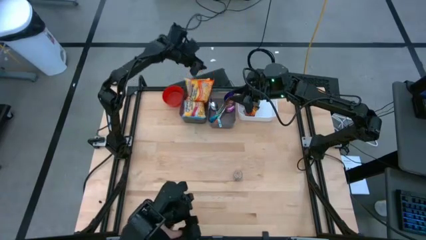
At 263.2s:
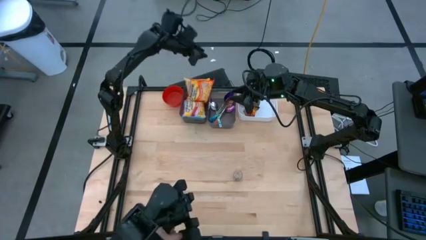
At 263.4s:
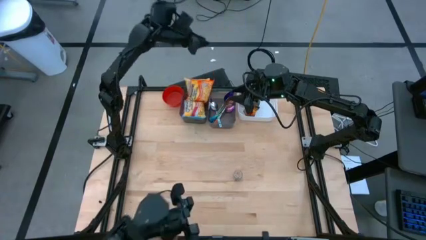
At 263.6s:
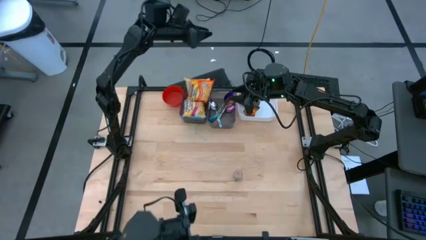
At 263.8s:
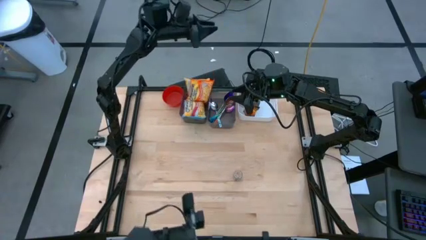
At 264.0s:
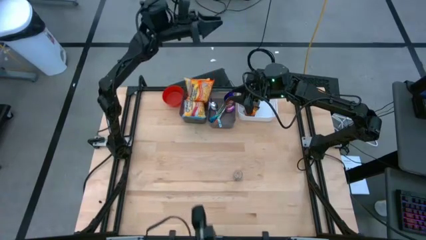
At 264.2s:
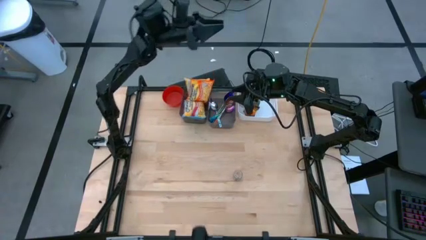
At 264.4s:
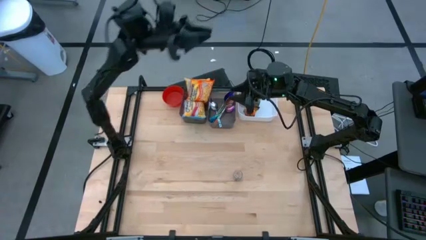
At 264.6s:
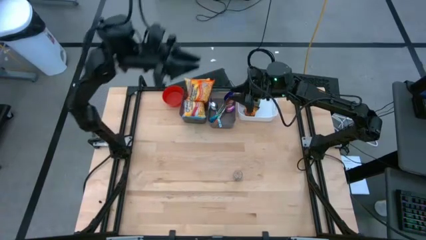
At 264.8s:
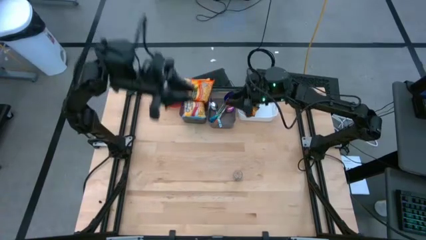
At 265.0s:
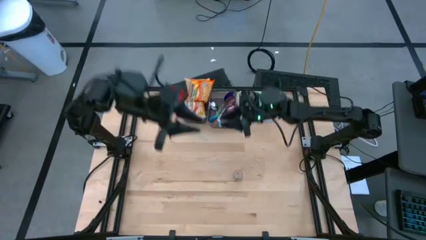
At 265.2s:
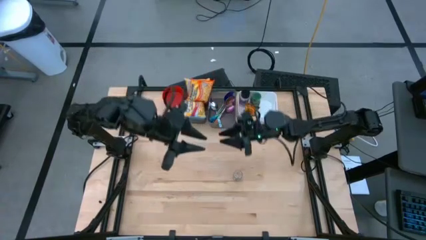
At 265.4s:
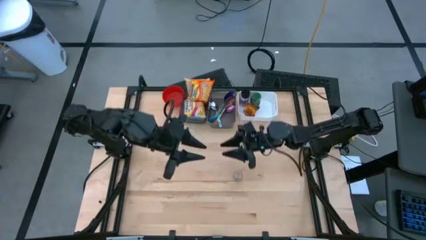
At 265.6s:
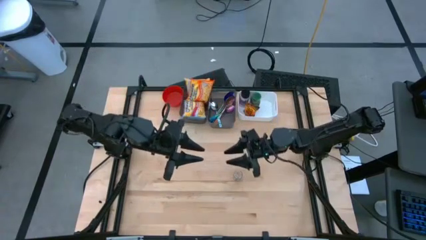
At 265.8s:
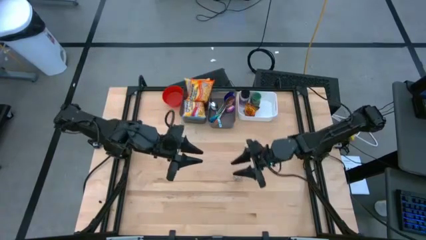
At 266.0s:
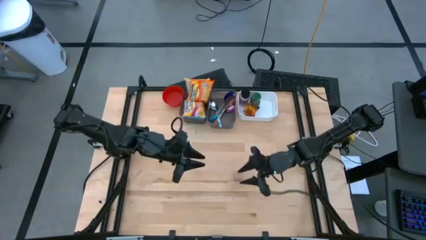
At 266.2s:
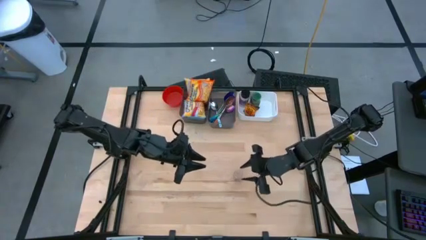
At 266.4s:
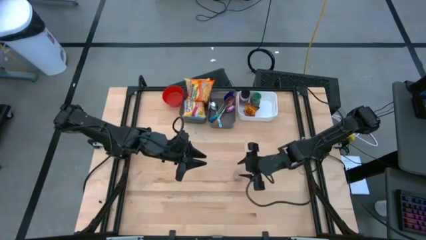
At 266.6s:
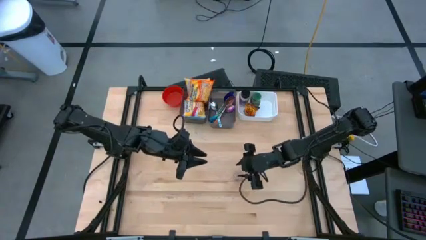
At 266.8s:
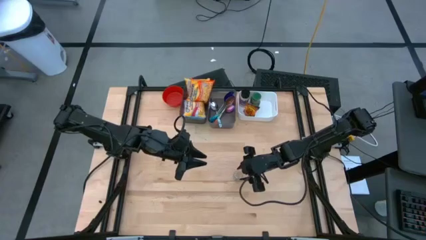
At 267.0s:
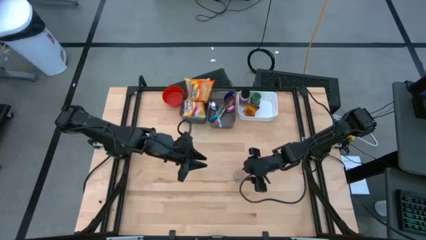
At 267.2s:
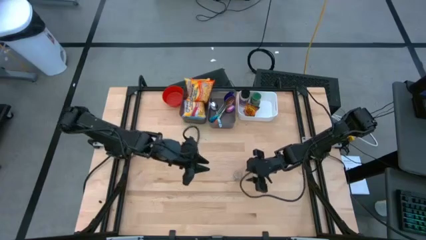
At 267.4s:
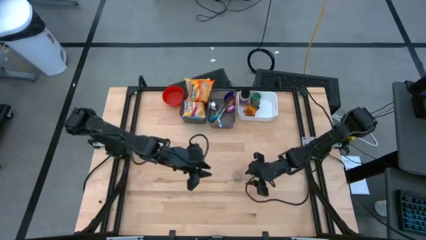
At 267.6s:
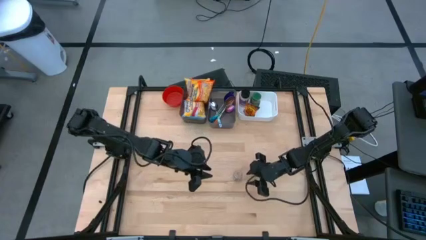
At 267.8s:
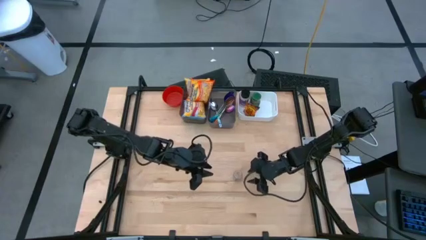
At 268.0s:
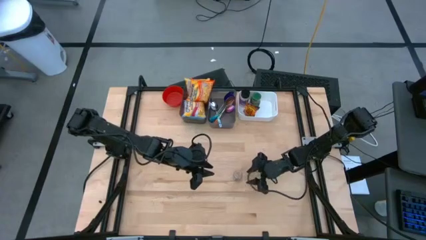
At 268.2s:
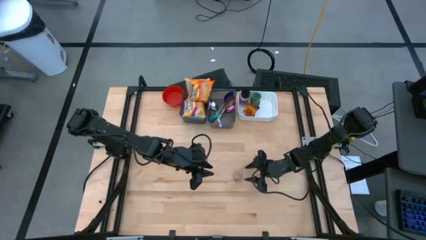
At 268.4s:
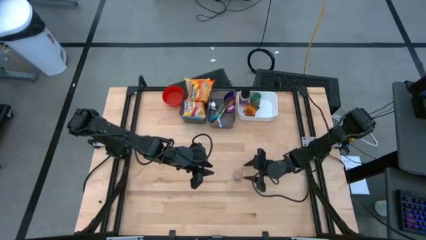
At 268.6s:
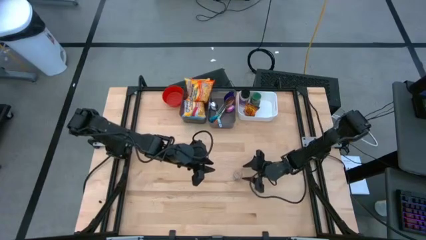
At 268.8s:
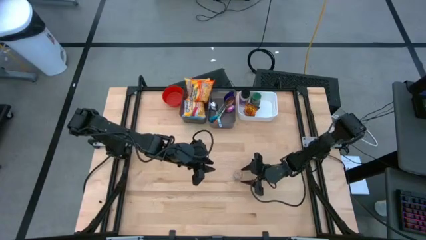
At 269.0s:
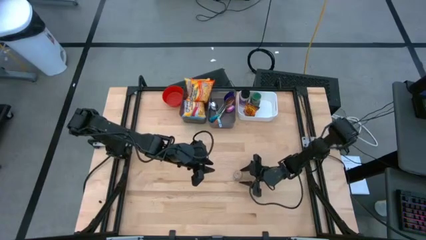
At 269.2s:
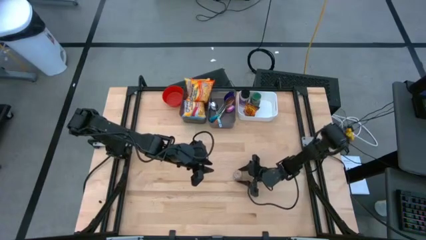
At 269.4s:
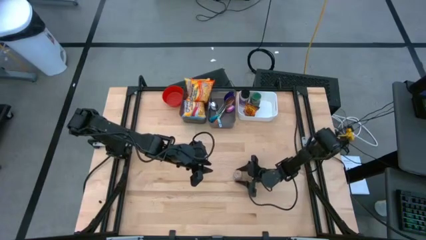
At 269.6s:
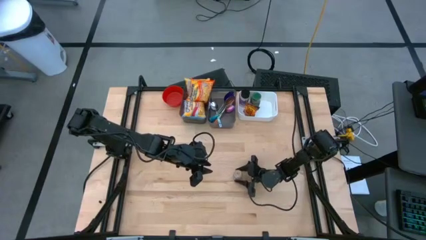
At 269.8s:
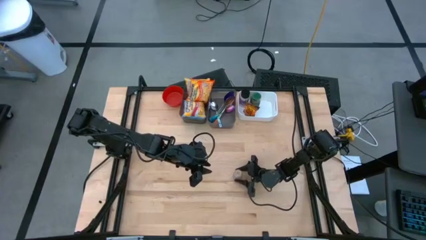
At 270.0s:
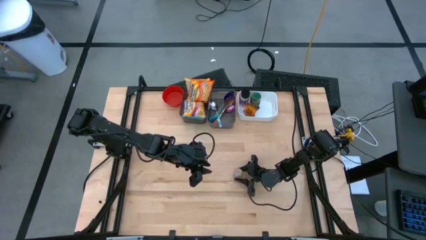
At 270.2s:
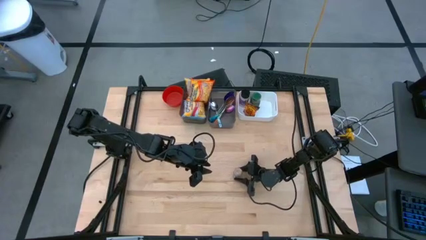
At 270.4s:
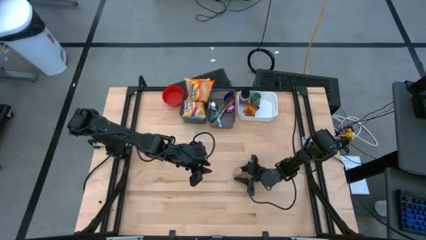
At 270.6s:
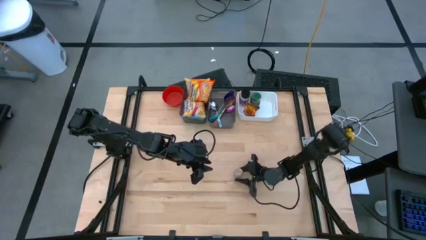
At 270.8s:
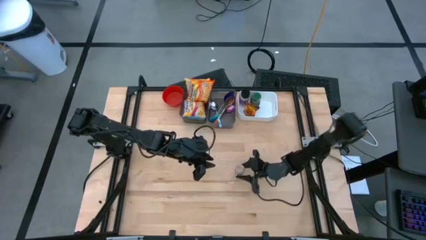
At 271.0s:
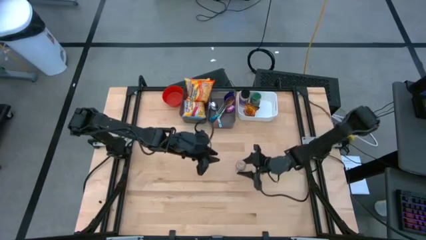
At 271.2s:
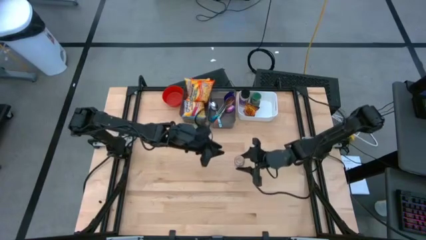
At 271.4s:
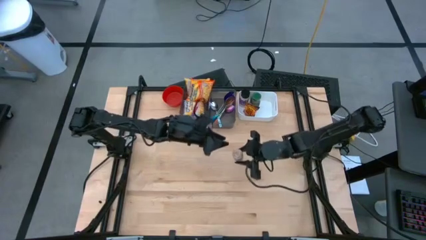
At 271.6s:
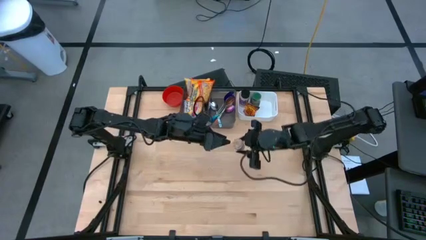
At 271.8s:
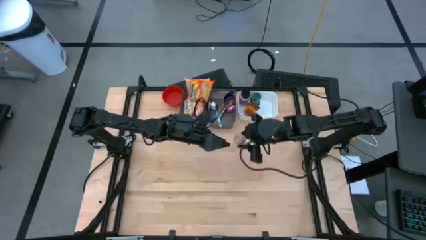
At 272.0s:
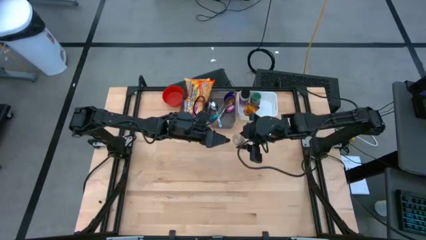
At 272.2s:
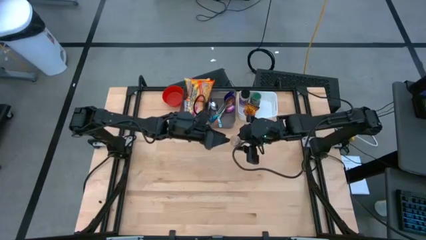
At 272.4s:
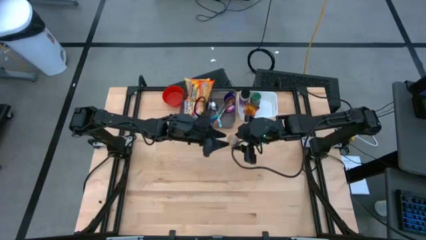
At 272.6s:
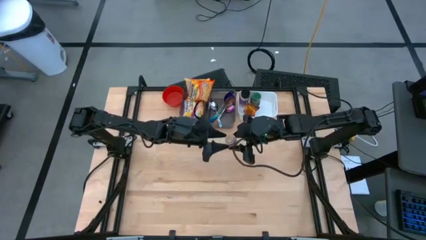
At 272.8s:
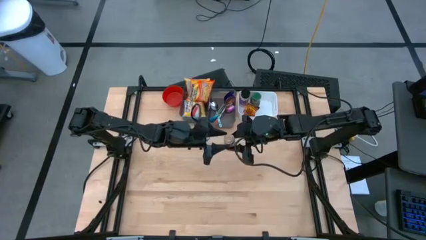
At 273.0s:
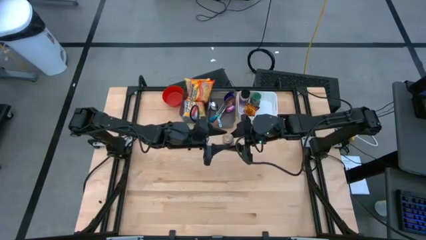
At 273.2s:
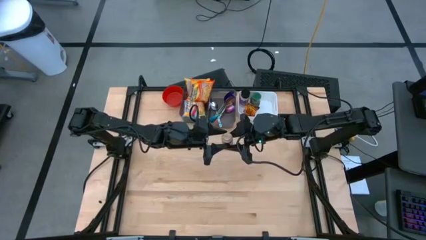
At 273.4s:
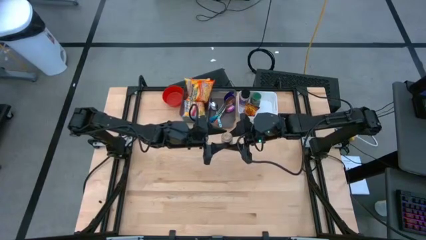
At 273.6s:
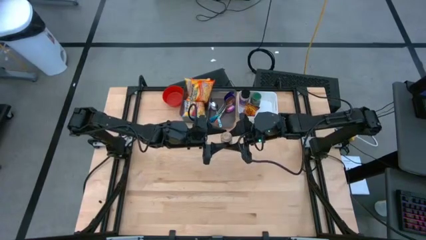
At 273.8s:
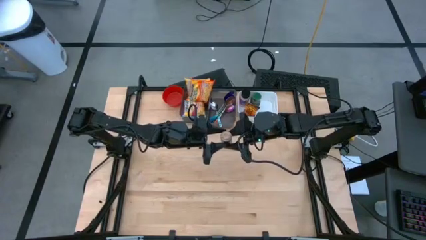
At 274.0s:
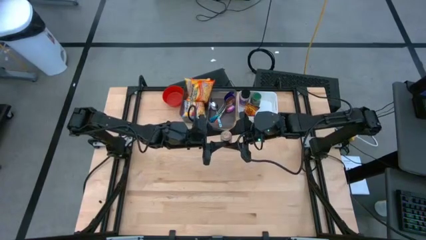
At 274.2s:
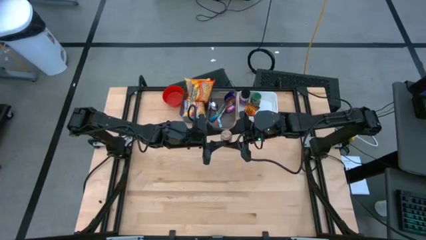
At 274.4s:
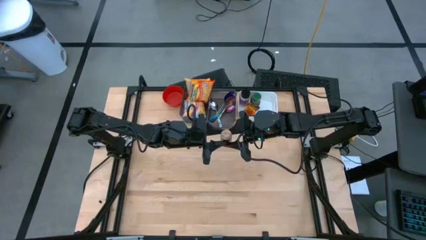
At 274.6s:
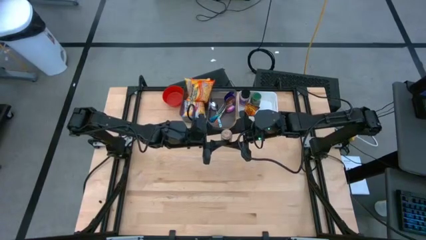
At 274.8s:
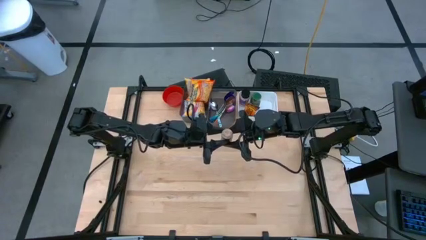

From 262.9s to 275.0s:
Task: Pick & Place Food Item
Put the brown seasoning bottle into the white bin

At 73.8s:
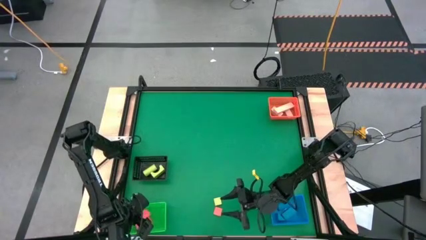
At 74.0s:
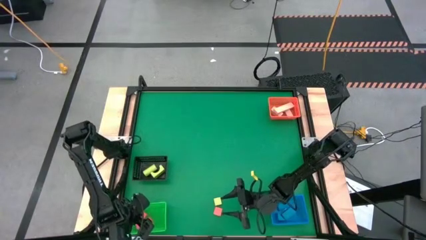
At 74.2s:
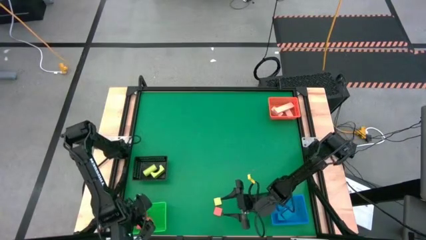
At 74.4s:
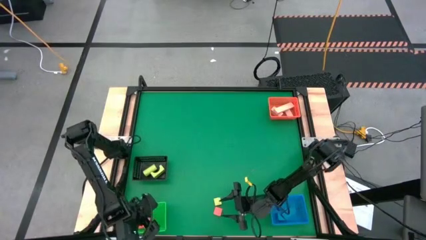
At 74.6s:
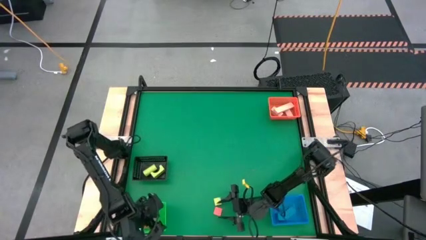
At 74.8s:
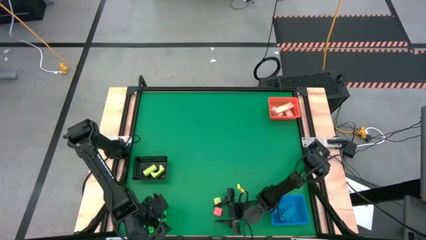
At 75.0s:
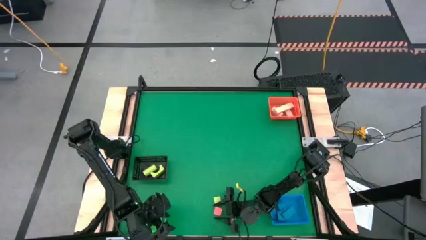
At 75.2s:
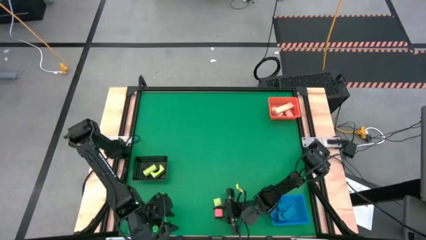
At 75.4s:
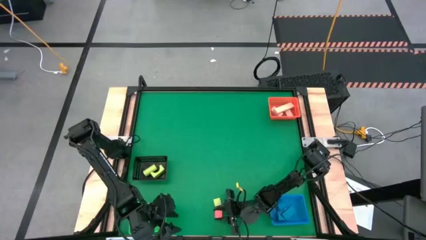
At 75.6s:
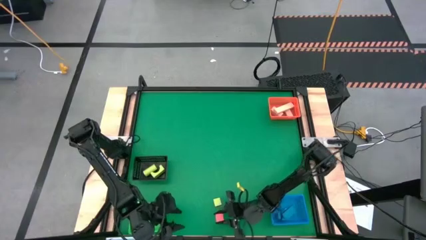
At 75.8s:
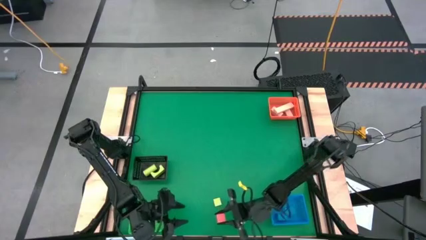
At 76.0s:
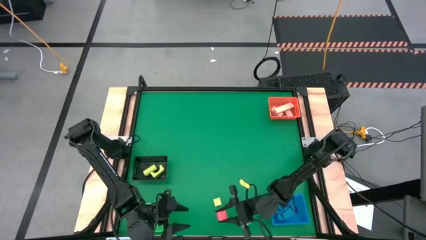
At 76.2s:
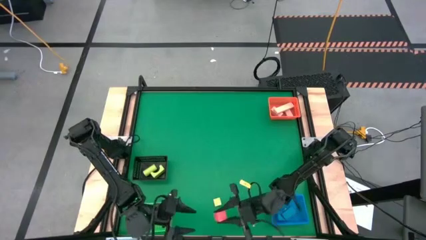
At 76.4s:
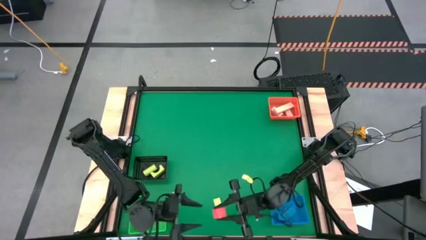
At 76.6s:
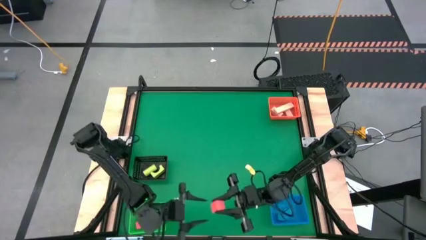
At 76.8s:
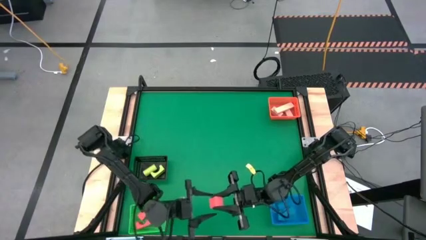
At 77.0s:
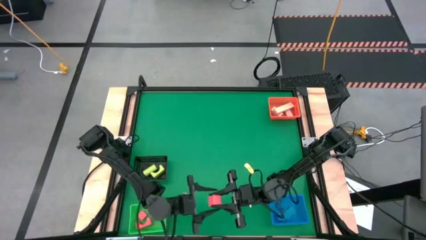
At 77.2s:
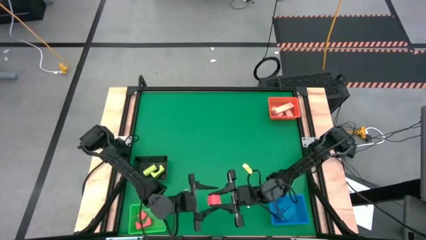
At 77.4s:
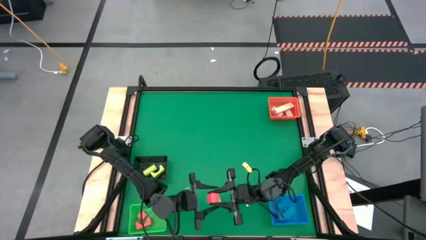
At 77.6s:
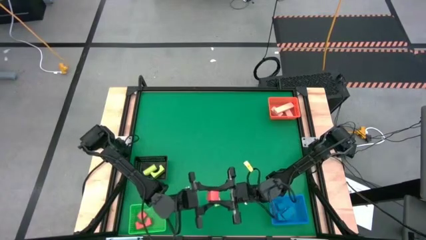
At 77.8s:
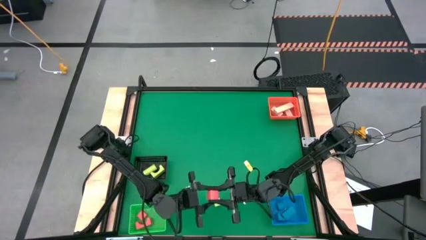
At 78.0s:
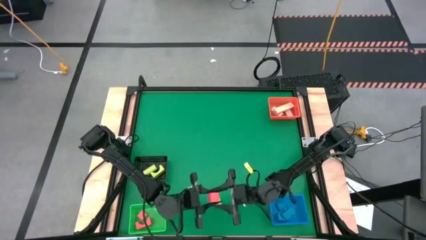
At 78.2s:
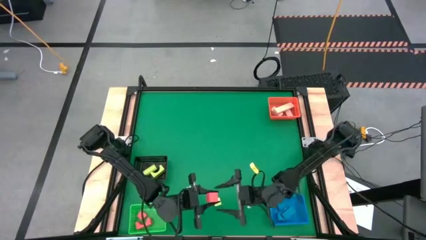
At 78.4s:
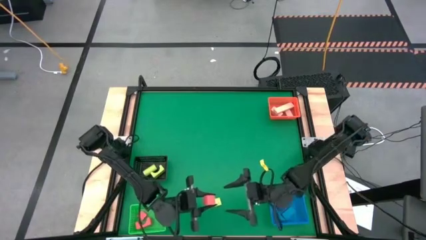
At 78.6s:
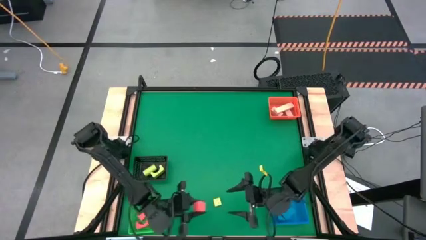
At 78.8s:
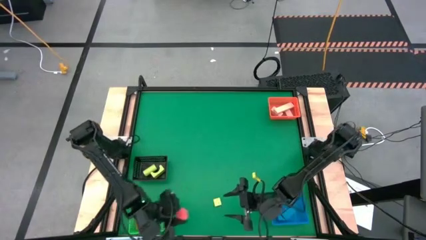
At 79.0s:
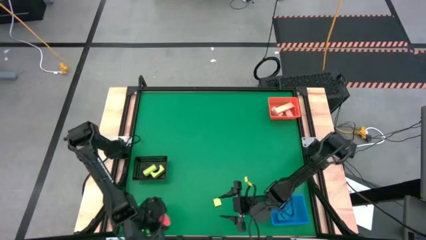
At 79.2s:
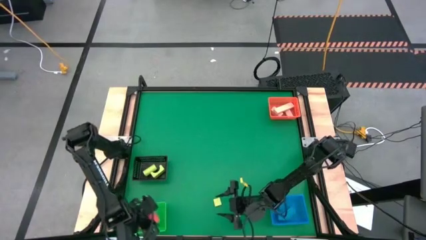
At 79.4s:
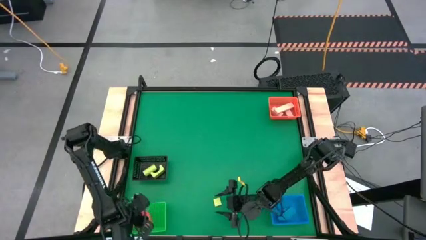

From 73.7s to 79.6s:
Task: Sort & place blocks by color
Put the orange wooden block into the green basket
